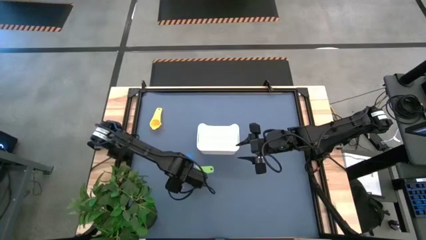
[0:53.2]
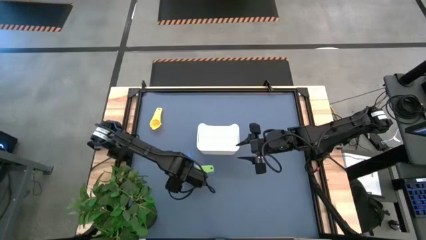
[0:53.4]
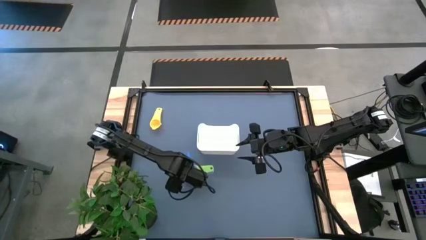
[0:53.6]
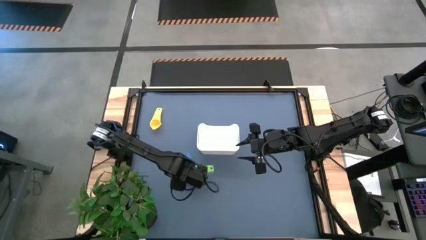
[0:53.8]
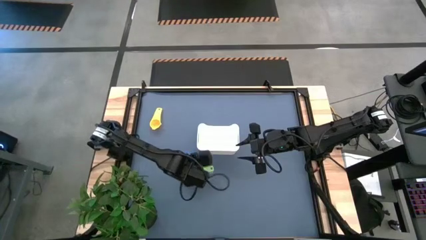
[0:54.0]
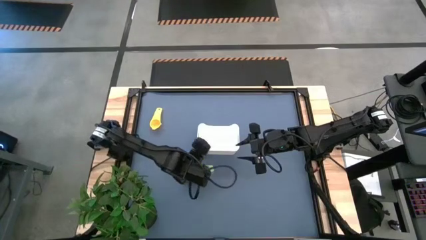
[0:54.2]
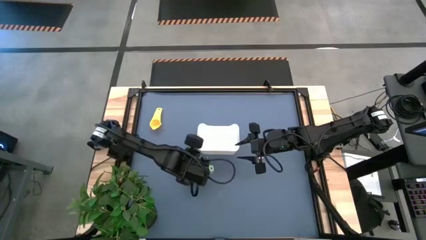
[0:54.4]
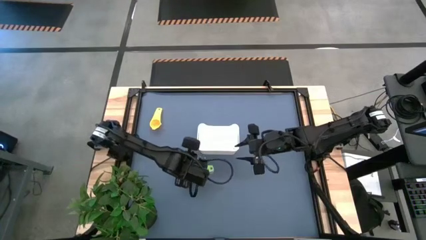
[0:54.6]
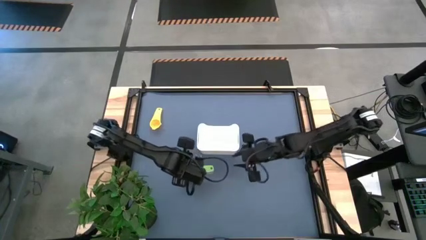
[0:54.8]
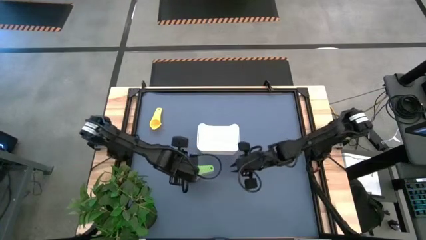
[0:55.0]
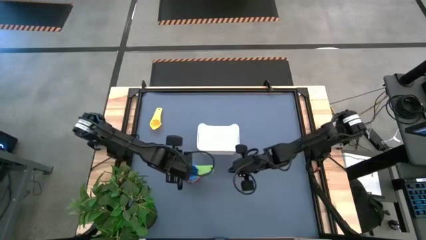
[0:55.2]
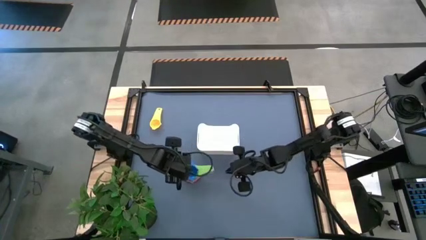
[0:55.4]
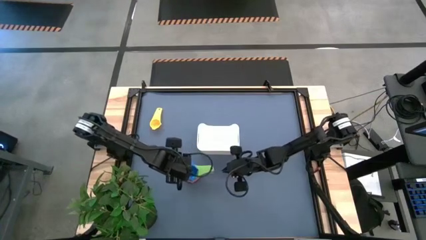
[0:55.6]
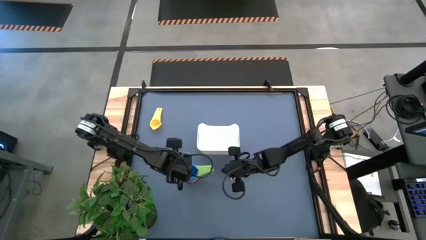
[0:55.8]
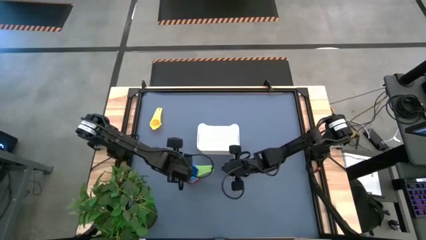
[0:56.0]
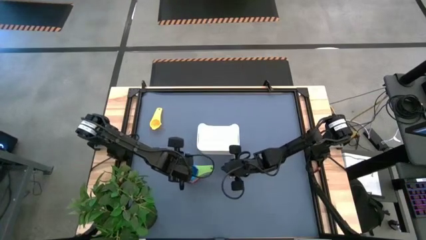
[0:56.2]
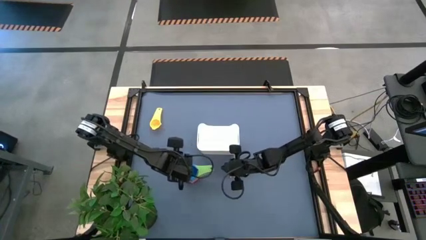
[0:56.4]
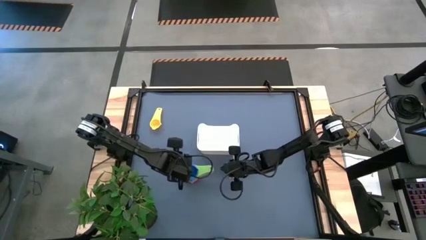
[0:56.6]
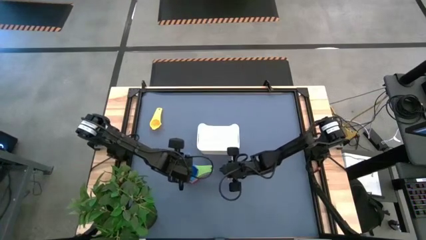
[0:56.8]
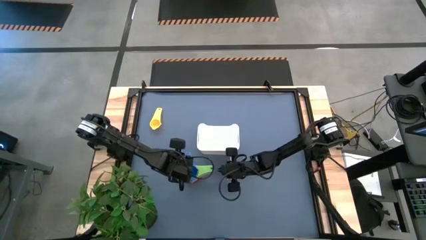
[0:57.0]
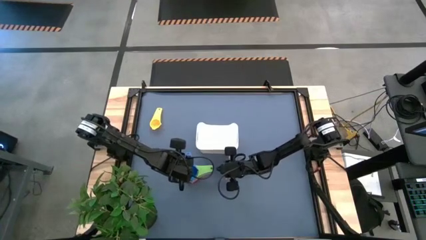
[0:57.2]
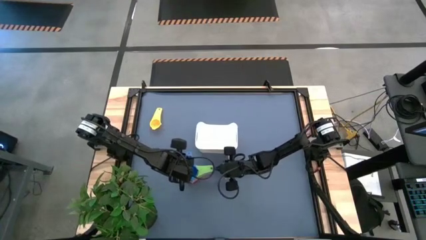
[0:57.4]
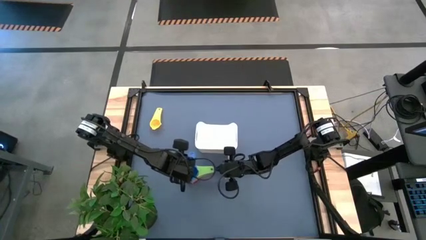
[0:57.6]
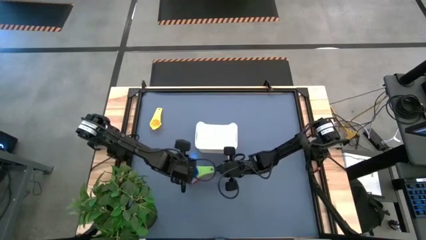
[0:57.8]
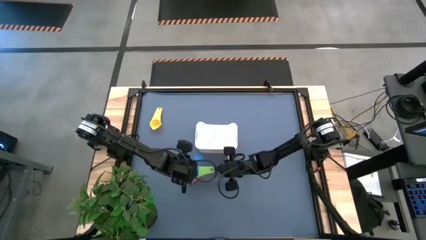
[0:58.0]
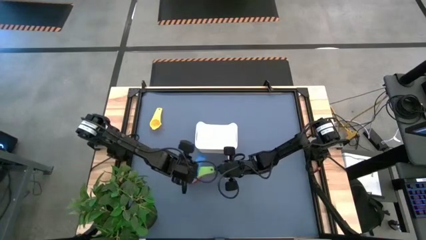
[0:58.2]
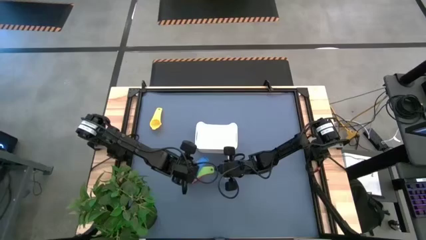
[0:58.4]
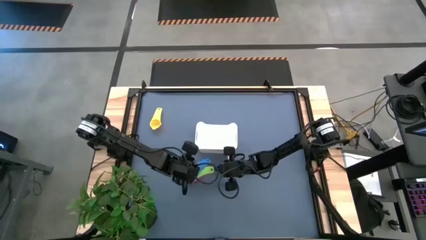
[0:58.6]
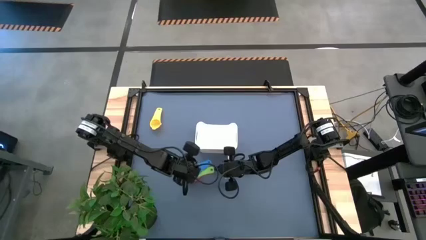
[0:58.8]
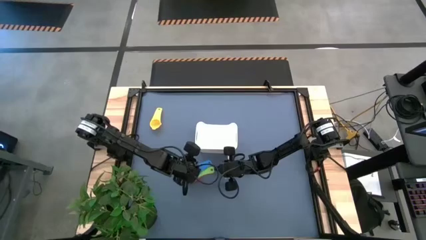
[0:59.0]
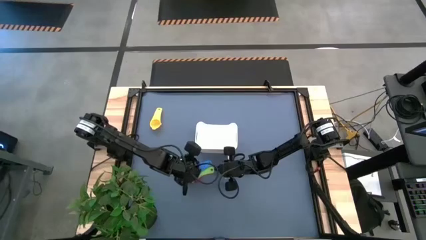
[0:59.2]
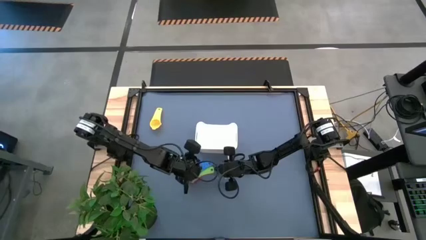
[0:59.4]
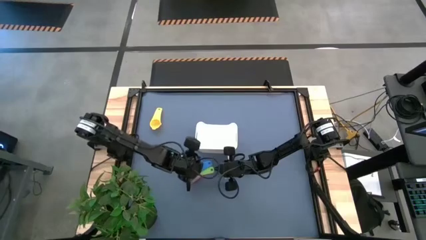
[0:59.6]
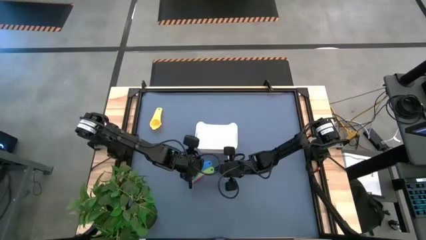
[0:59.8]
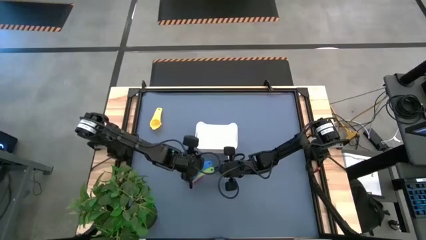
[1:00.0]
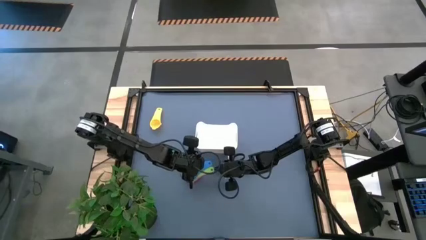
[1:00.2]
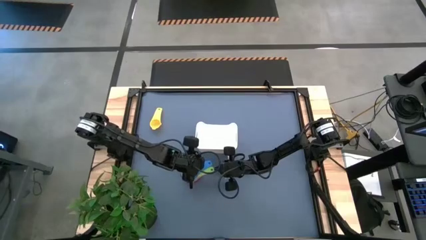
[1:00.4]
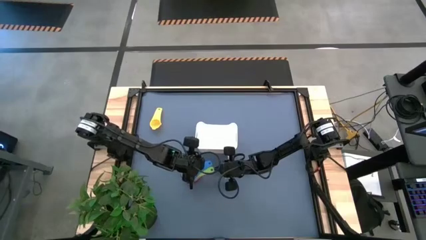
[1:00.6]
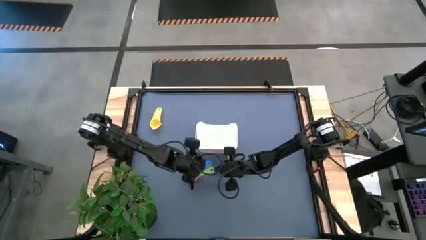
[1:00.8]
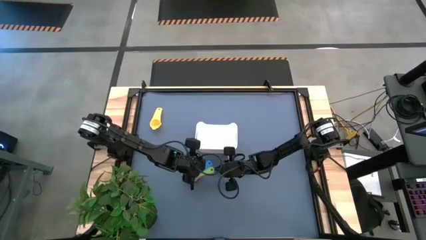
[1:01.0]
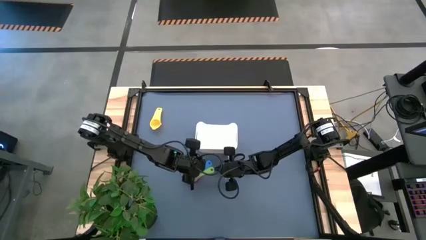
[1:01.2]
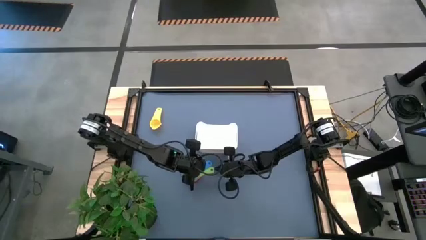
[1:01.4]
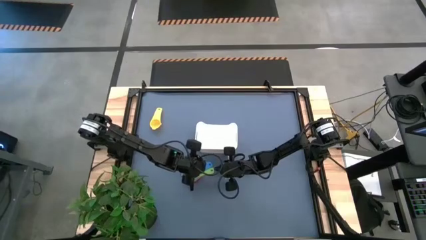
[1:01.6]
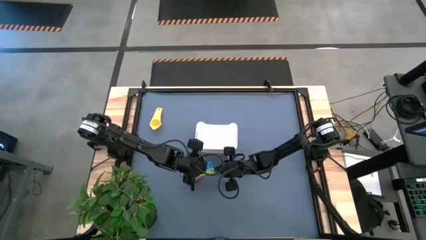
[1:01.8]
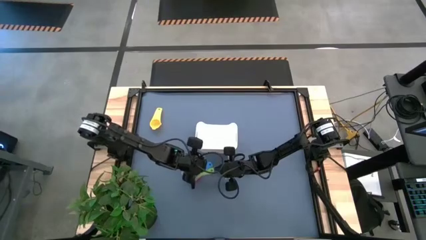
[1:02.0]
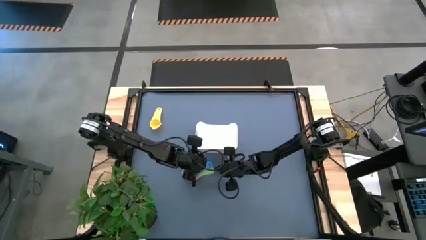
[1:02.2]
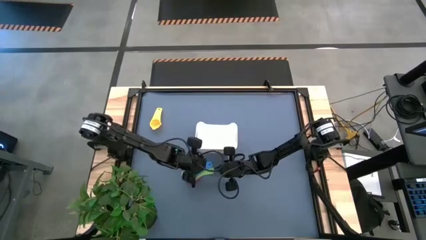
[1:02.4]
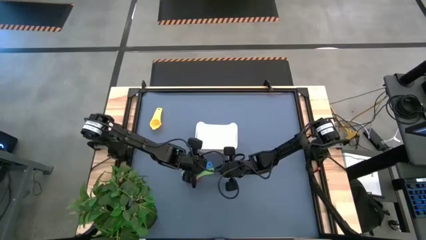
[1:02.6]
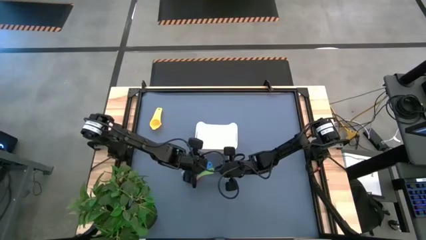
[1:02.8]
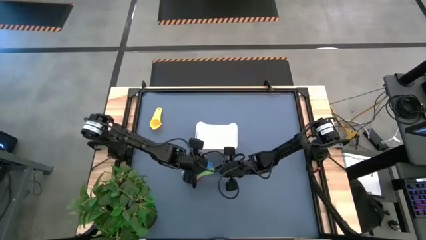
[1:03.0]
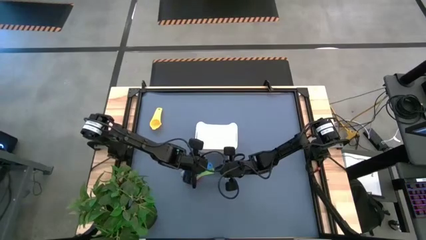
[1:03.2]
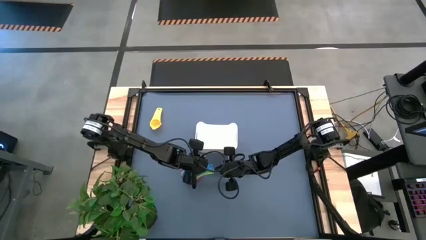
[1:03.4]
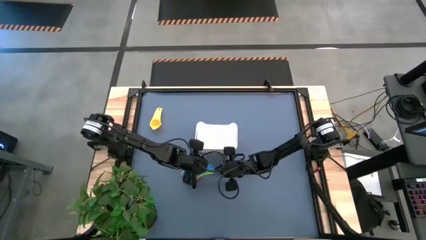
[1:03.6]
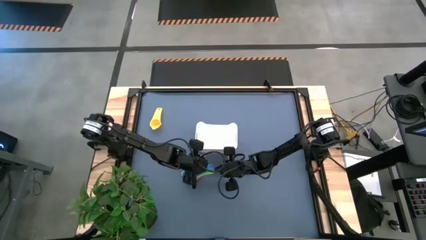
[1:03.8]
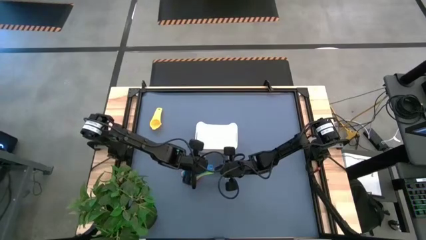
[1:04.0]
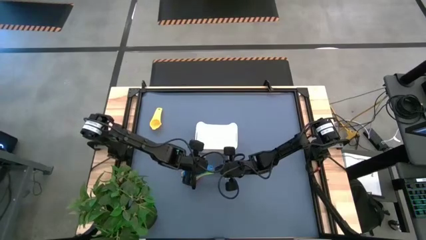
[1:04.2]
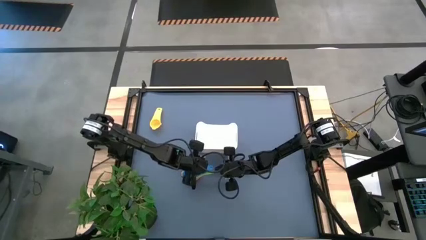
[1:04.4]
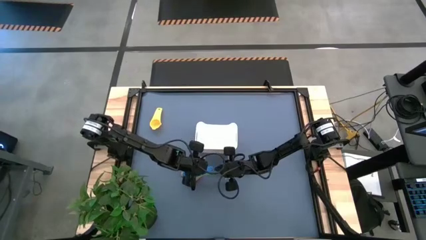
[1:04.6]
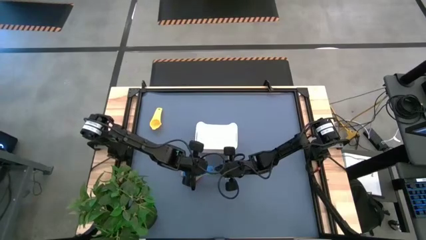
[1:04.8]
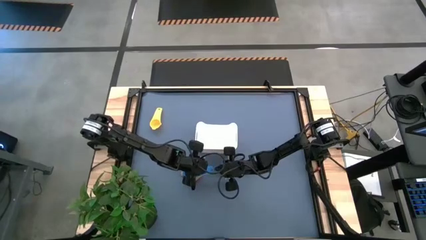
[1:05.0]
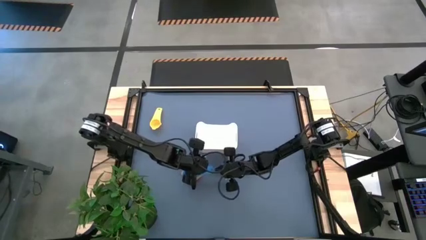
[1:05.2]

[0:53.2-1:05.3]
Task: Nest measuring cups in basket
Stack the dark blue measuring cup on the green measuring cup

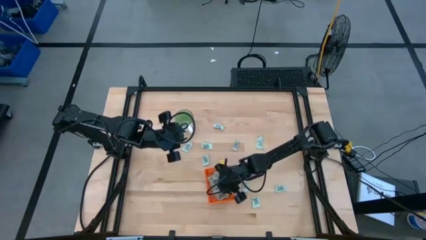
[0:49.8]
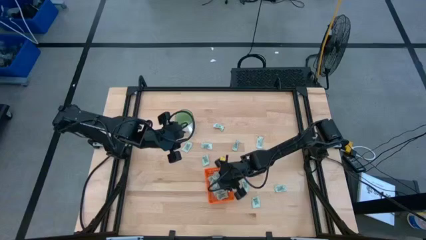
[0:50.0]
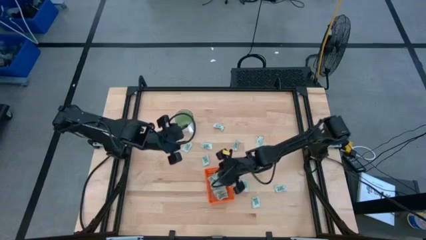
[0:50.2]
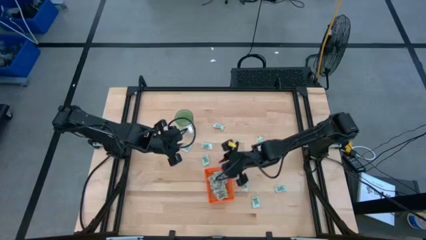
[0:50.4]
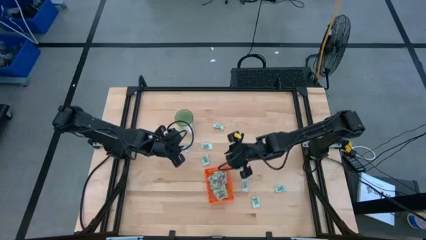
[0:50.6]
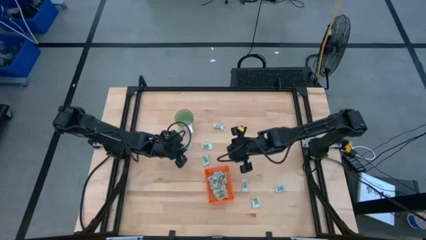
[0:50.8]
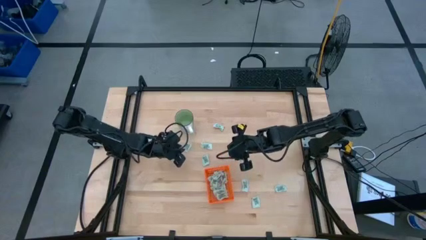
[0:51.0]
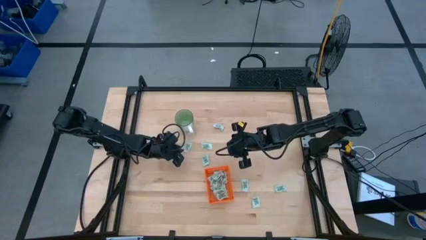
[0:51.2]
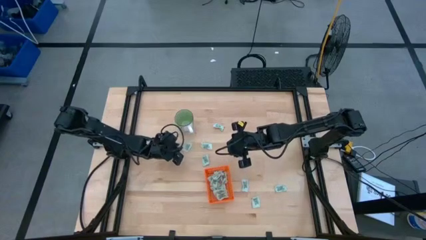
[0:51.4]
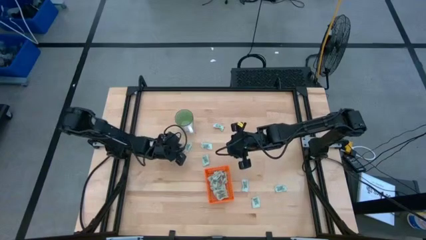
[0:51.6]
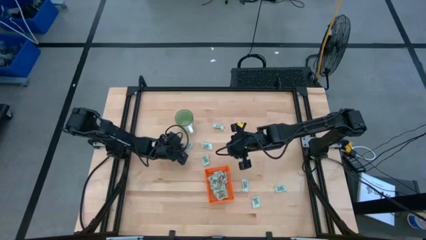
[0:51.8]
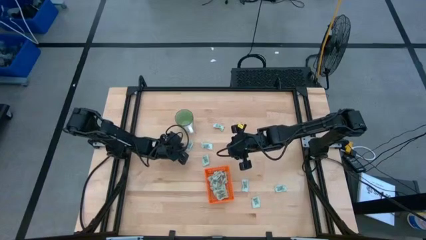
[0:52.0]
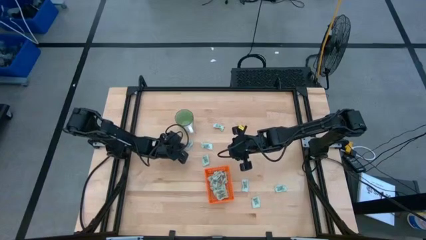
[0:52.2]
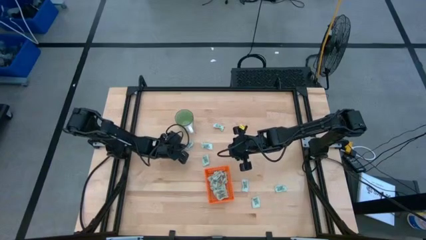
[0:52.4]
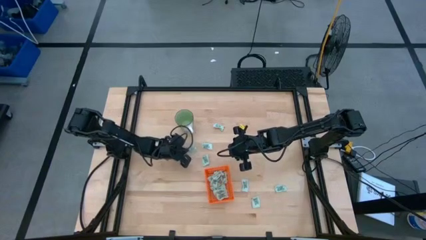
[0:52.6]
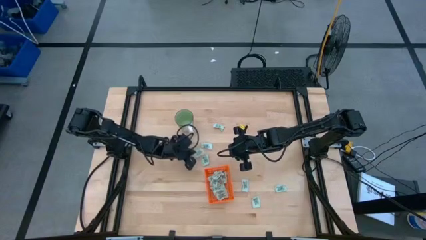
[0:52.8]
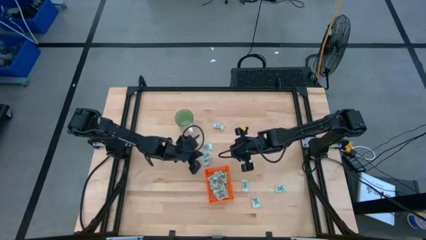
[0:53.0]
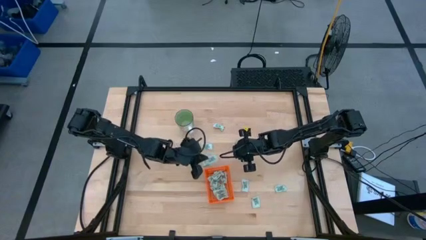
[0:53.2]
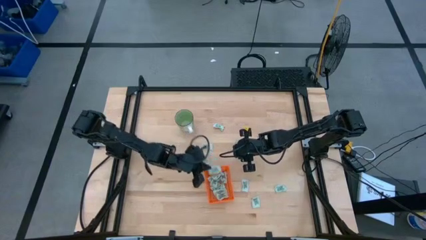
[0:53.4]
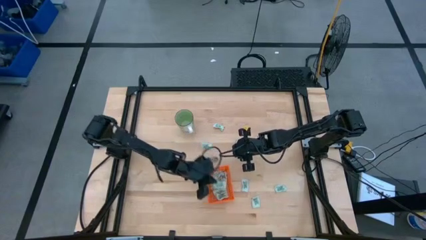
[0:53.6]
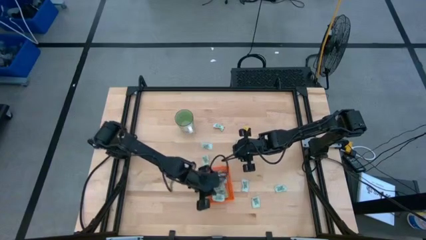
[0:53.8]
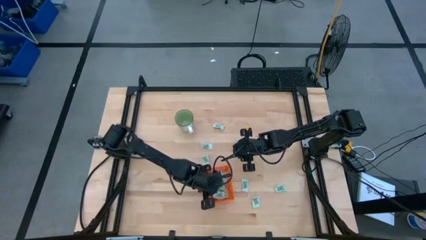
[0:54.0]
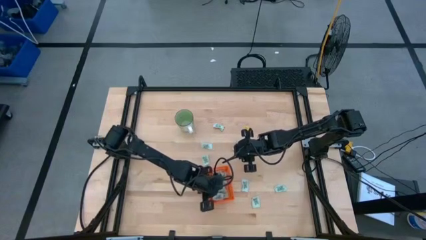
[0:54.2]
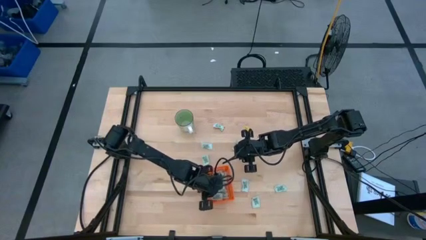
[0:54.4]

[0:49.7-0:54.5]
Task: Pick and place Stevia / Truvia into bins
Put the stevia packet into the orange basket
